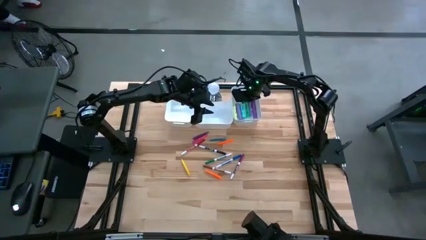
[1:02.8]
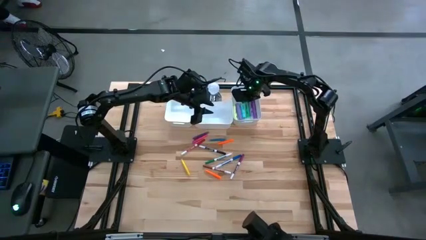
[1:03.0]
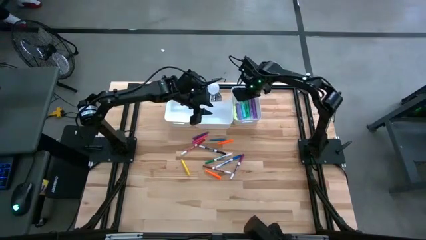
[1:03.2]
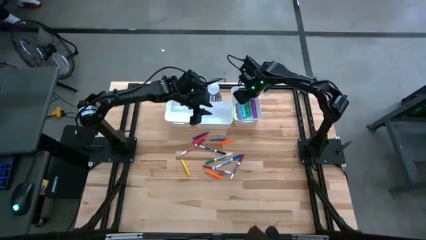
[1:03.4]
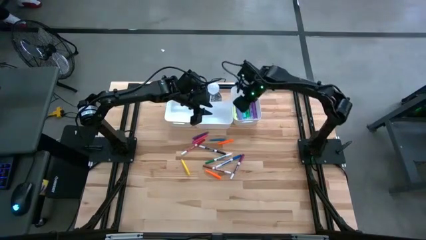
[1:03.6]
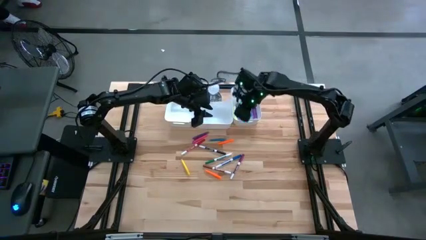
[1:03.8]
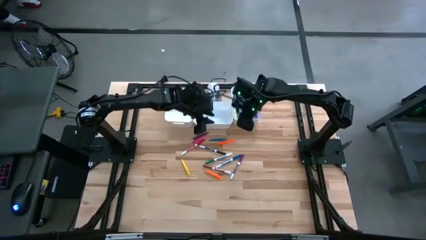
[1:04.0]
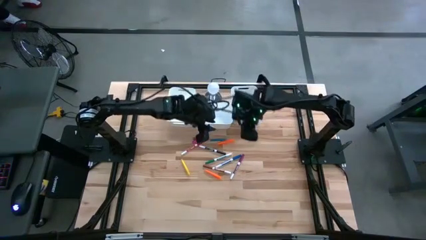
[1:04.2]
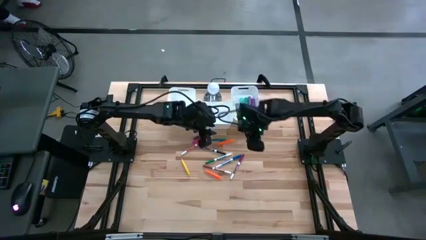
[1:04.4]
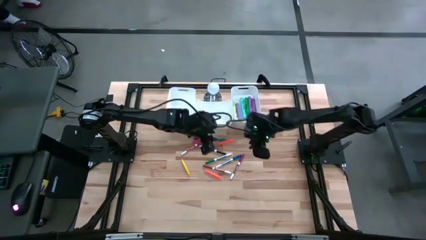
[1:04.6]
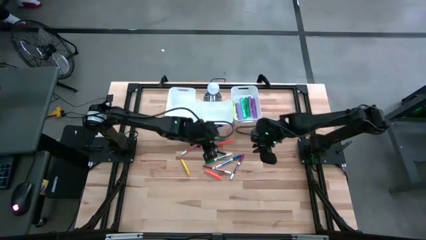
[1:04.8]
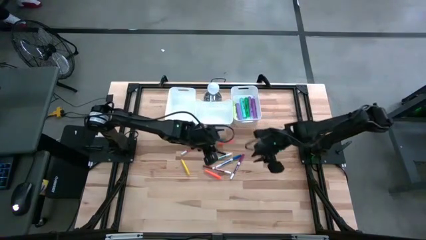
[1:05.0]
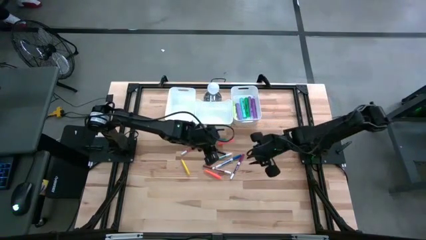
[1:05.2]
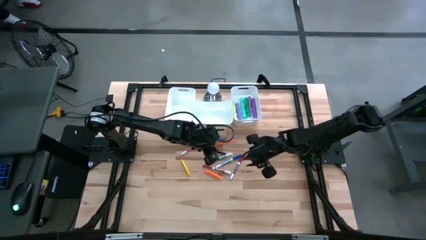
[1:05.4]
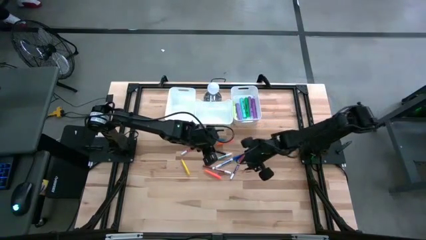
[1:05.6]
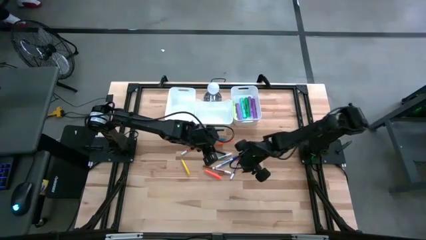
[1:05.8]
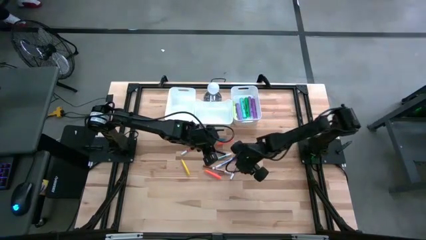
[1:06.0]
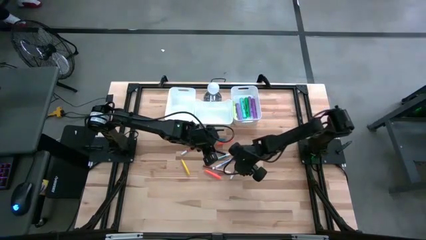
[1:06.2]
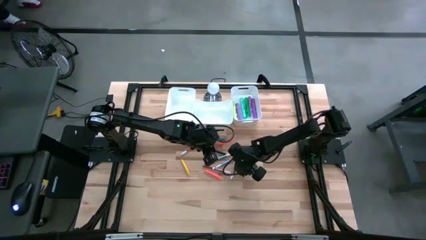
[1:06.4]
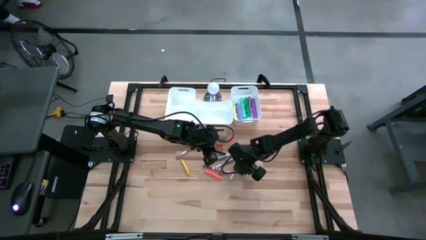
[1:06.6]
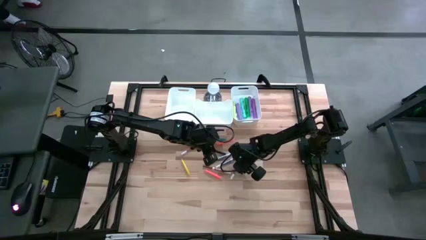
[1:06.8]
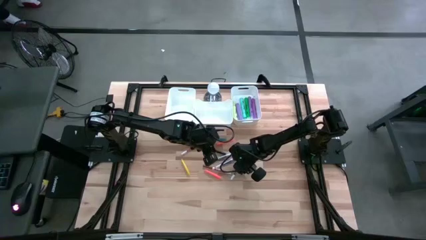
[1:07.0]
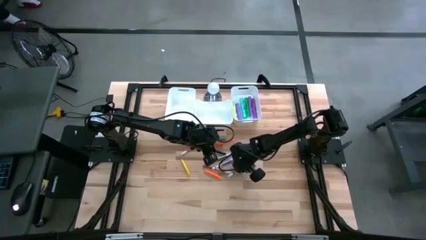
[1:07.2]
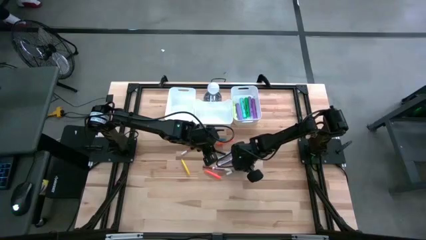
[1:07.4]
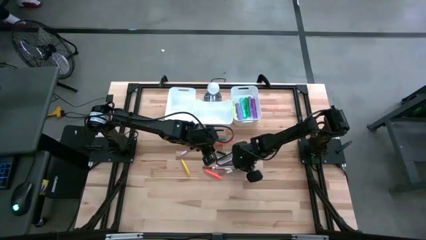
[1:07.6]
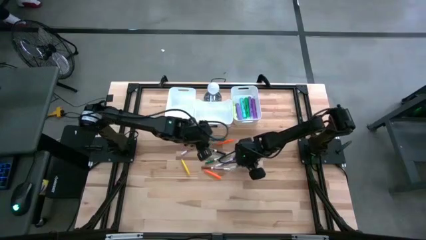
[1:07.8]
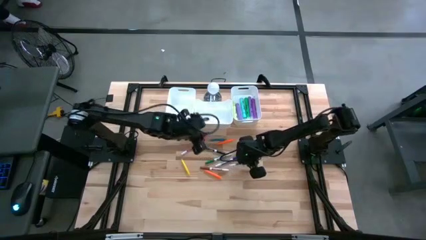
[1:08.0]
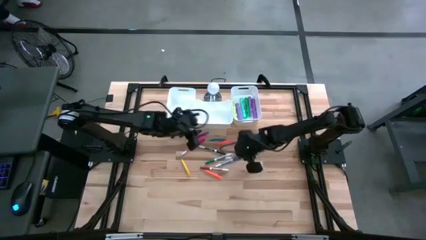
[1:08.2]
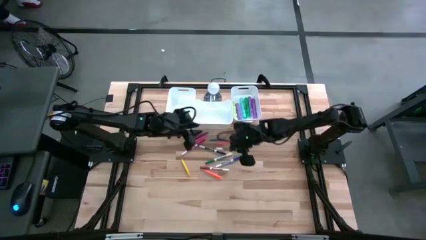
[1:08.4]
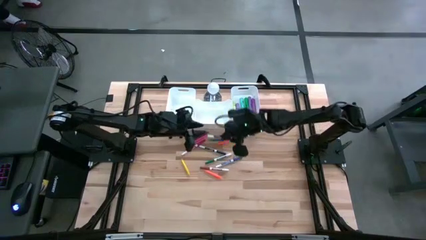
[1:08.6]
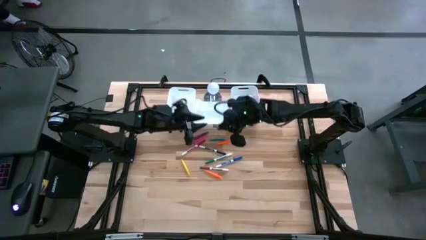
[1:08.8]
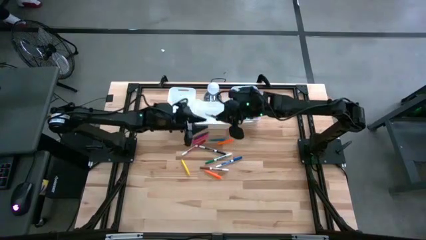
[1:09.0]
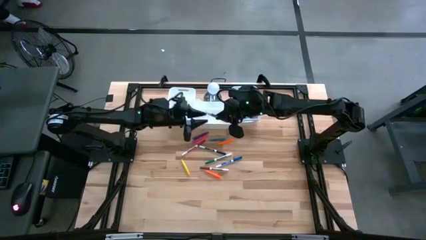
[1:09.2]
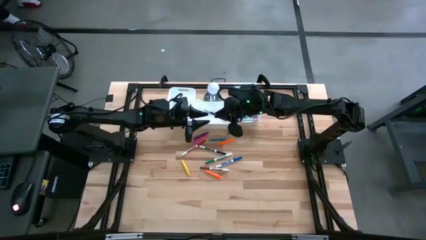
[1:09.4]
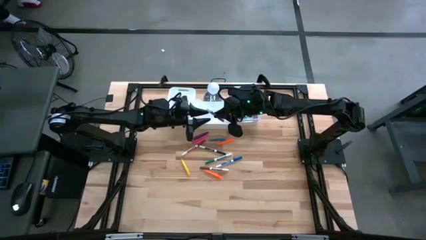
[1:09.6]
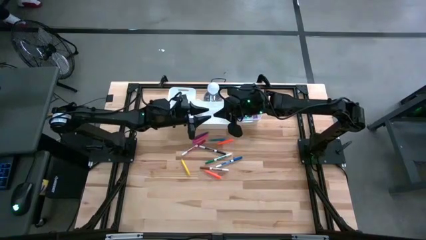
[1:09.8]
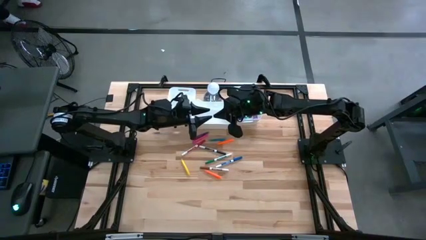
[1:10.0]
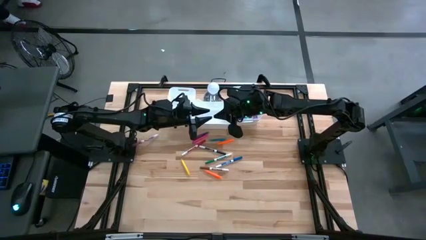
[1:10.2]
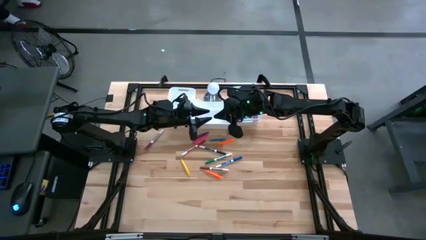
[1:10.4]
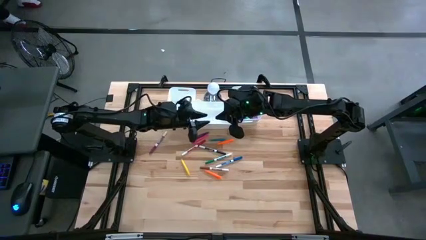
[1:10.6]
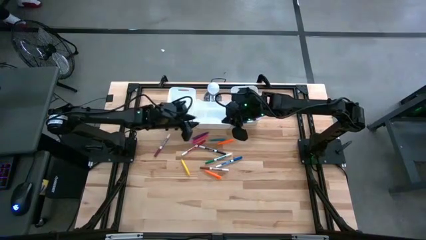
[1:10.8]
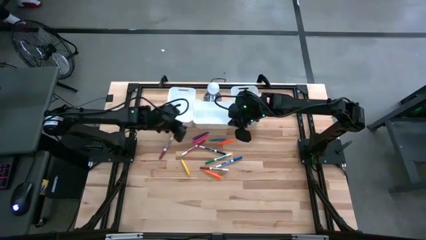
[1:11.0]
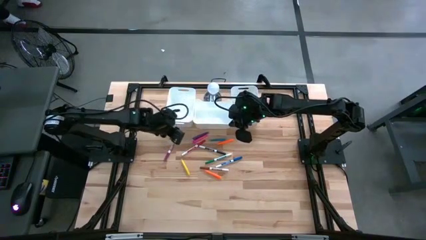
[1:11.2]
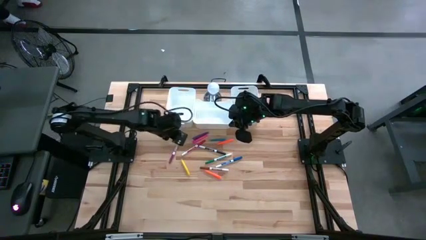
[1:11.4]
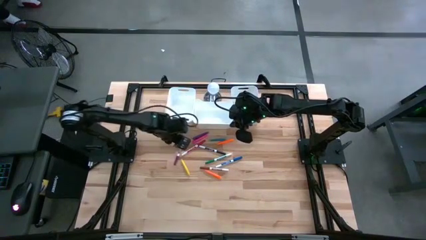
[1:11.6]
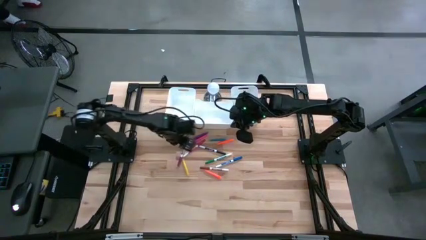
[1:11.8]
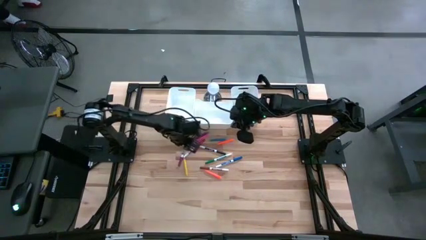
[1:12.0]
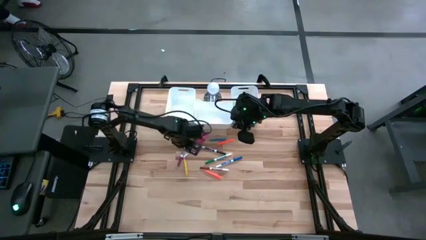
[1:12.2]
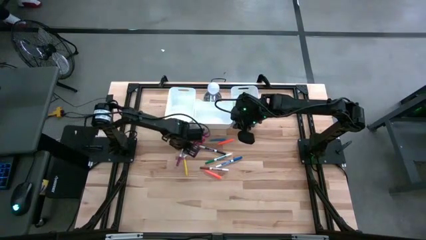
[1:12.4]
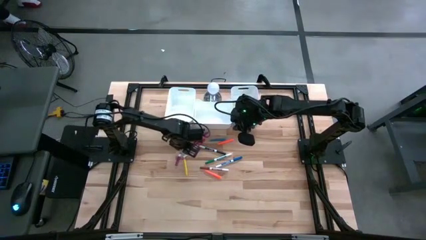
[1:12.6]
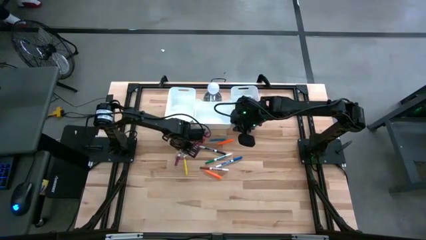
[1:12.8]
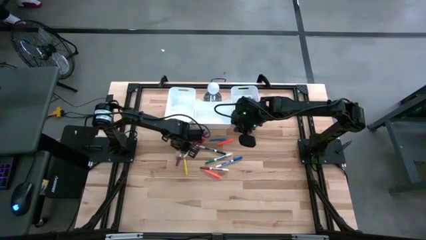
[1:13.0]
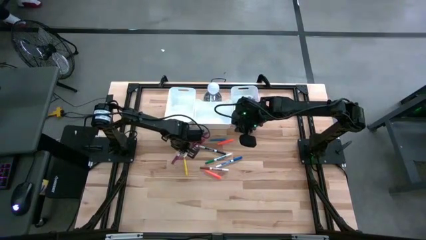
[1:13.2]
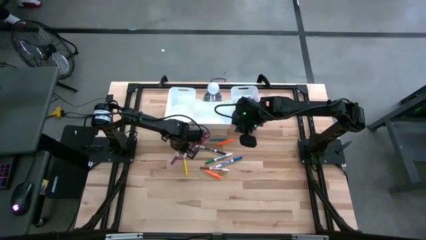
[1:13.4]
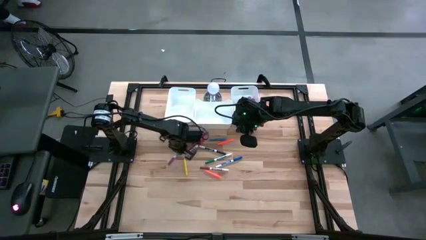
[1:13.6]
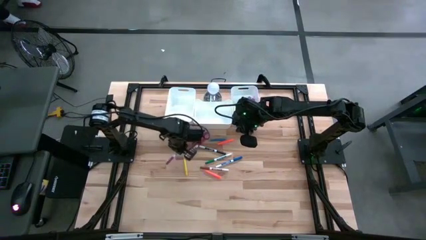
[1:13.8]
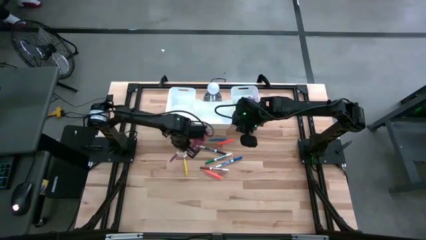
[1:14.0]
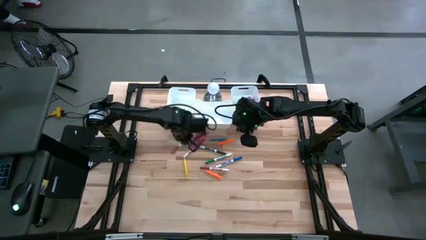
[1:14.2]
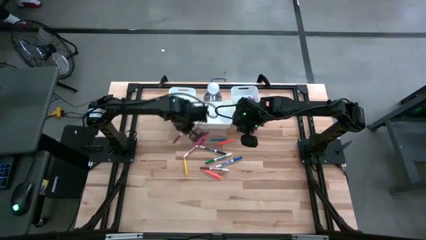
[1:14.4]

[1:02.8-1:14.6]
Task: Pick & Place Markers
Put the violet marker pen into the left white bin
